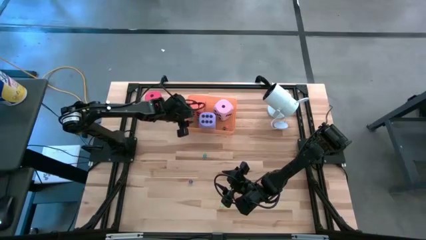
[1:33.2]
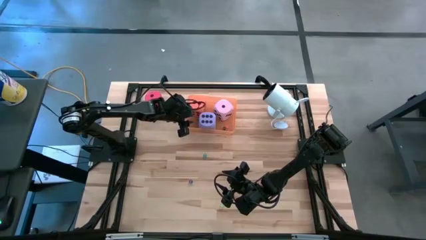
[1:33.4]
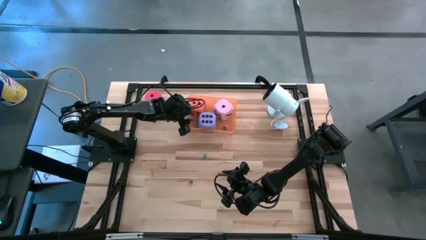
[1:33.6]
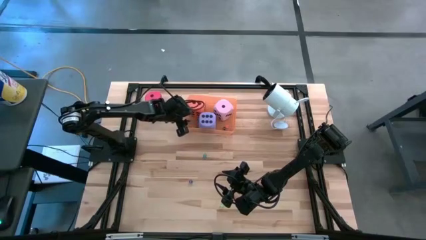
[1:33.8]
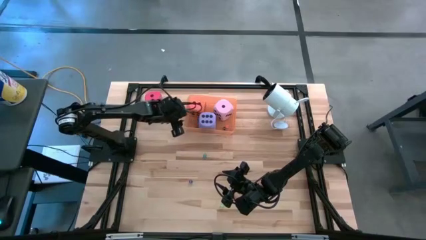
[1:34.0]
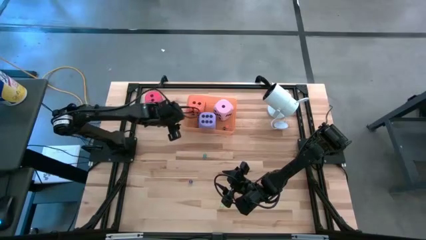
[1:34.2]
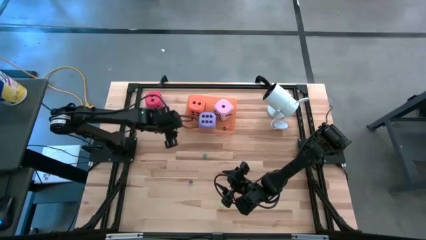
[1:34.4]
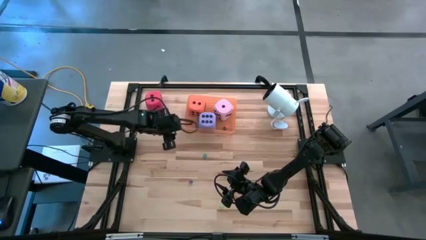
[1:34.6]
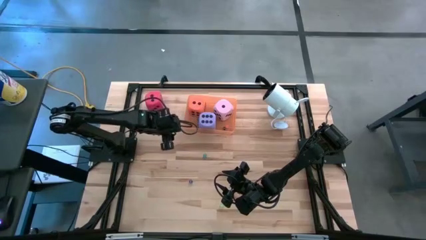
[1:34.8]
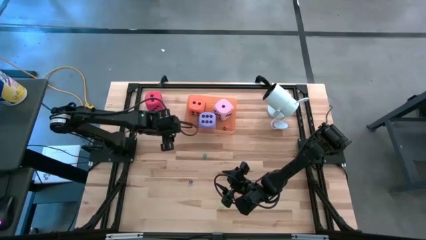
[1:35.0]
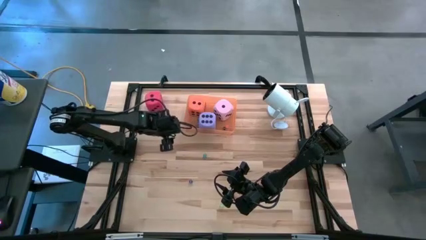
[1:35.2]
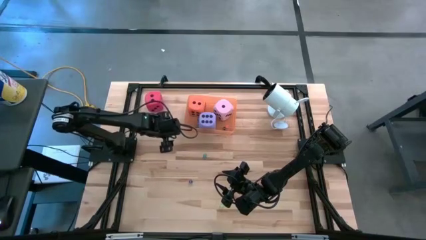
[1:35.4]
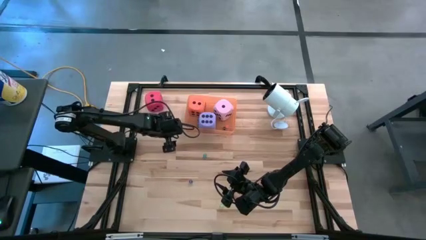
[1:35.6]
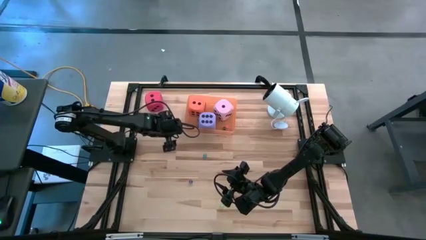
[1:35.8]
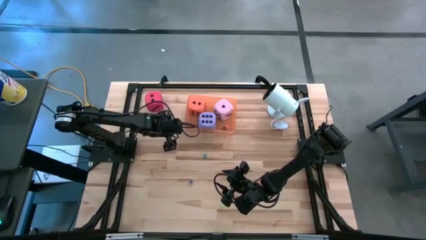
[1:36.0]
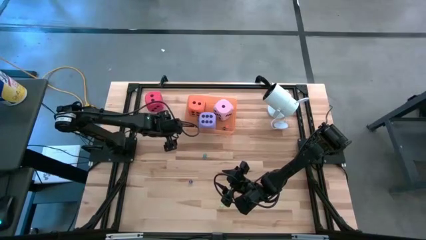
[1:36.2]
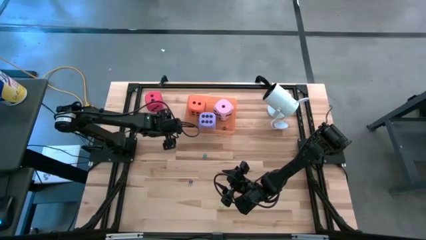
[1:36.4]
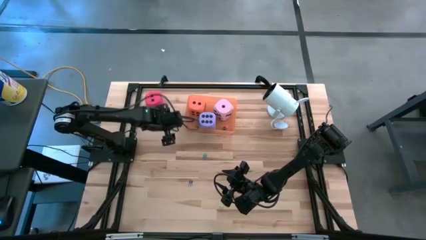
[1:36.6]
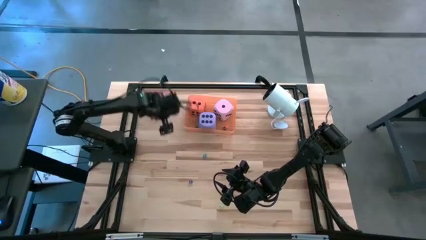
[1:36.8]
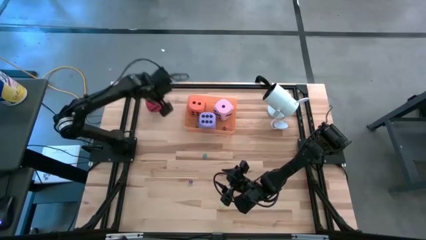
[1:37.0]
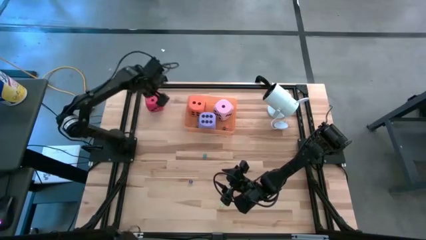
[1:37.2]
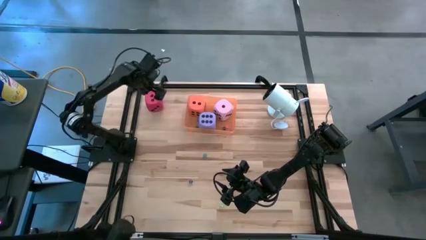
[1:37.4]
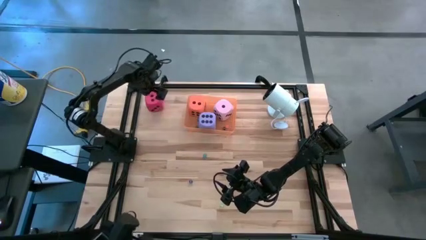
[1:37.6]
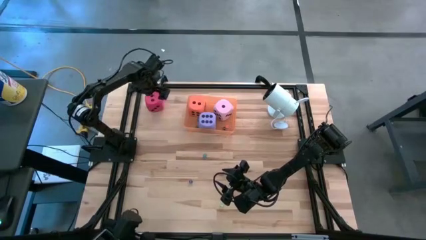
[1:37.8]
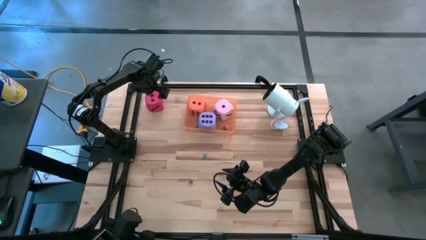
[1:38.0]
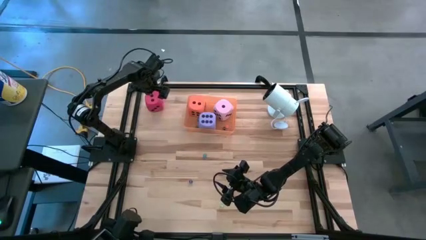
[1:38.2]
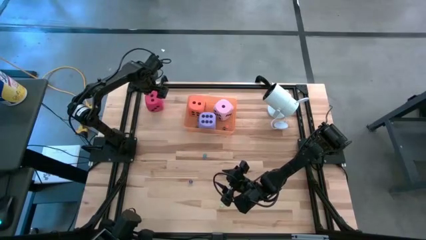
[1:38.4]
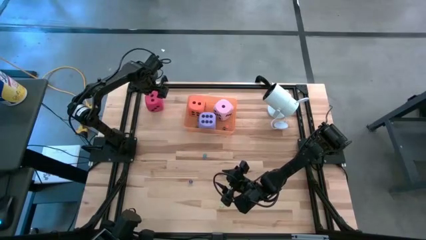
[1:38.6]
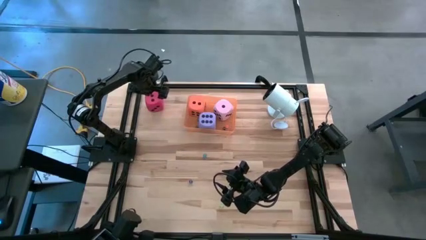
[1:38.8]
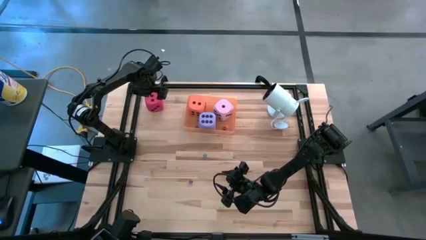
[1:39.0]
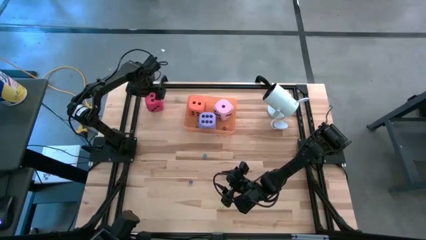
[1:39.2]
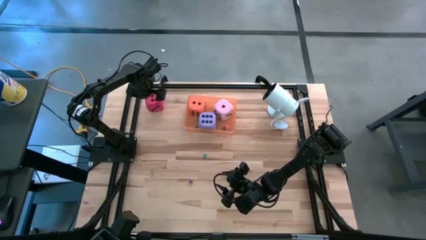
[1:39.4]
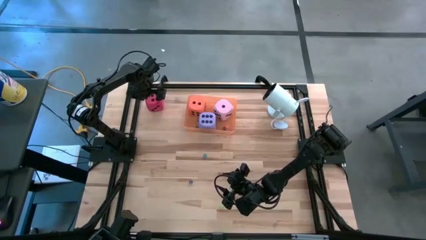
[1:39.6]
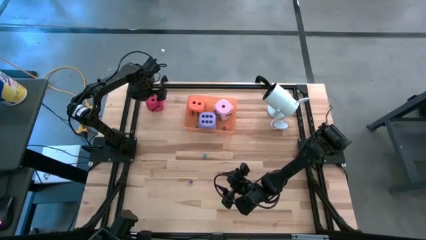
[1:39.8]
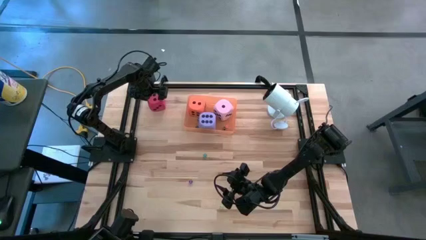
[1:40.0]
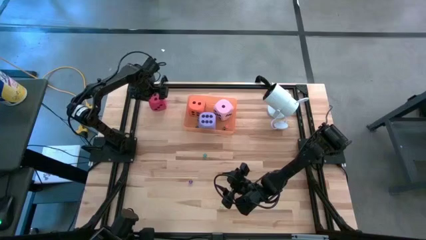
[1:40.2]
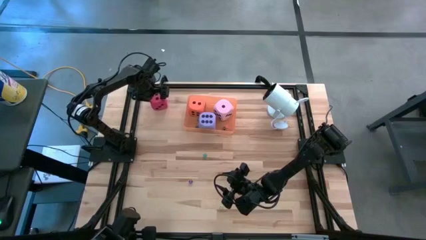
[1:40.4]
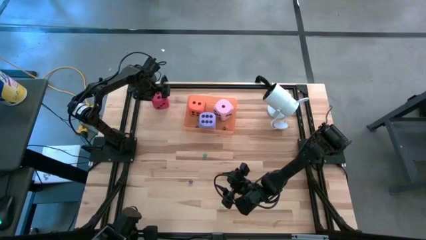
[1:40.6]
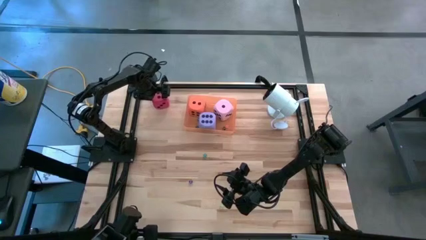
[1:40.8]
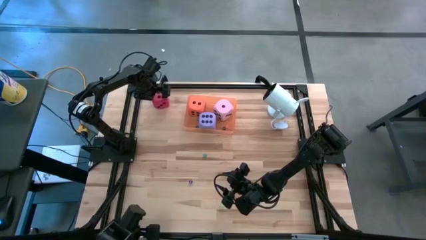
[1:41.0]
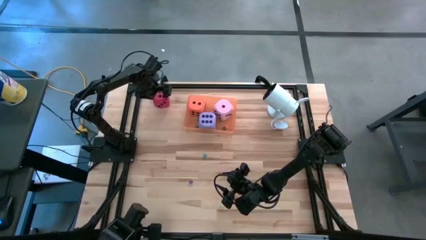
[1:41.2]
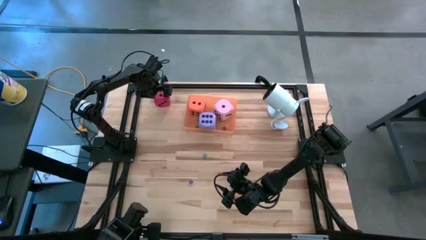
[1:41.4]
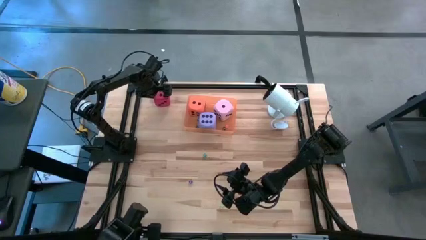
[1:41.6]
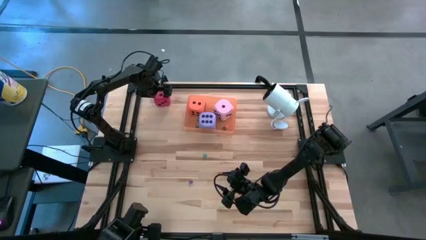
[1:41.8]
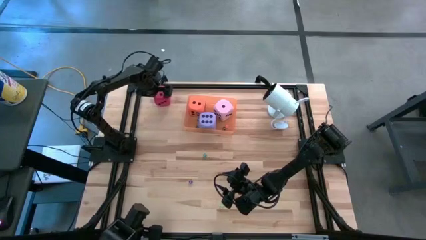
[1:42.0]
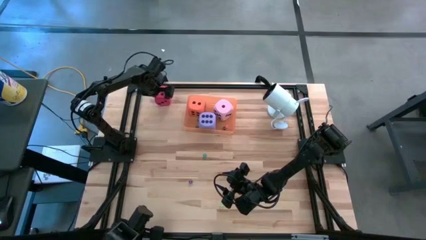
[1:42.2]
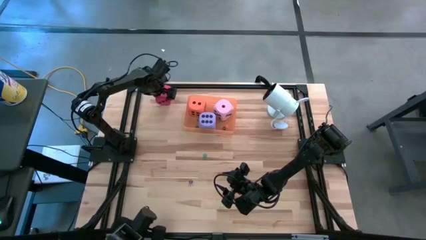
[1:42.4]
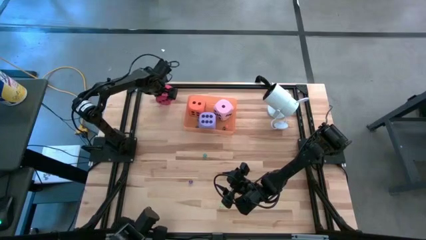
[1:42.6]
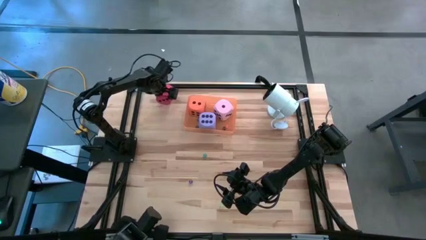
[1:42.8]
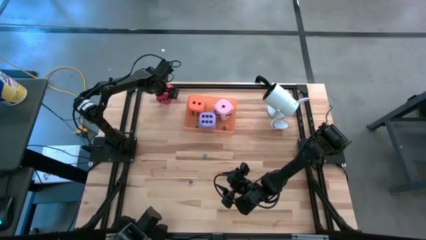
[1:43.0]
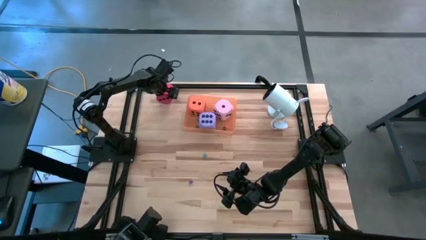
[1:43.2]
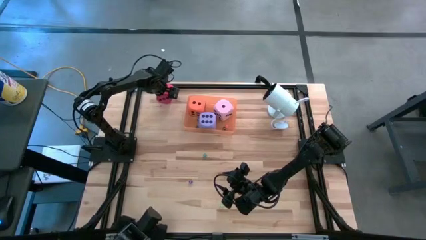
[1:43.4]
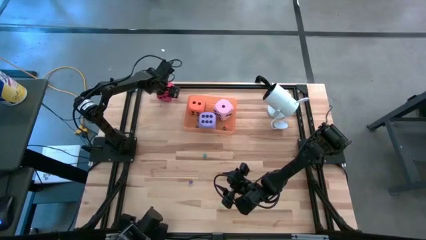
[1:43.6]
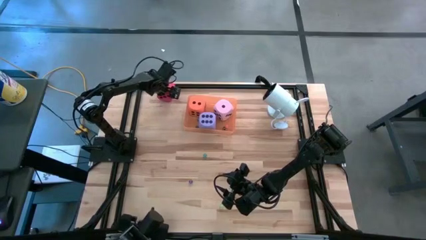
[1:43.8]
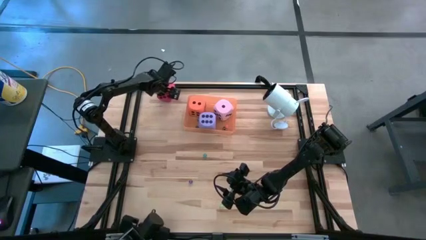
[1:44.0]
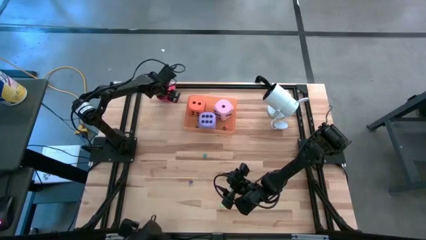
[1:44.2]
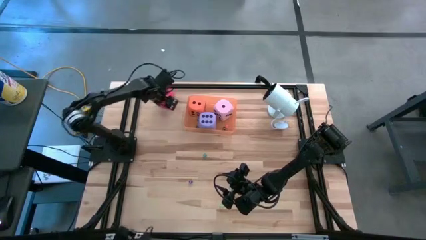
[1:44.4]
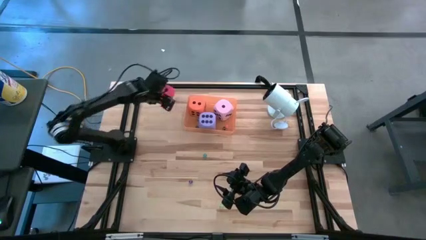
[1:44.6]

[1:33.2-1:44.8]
Task: Pick & Place Dice
Put the large red die into the orange bin

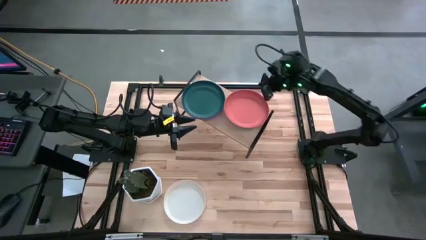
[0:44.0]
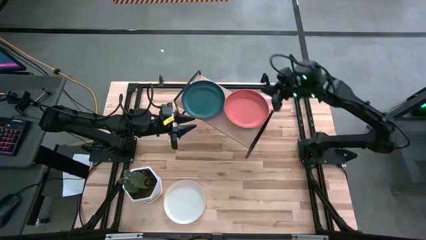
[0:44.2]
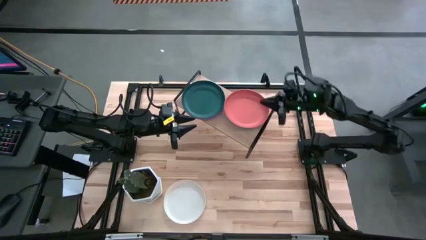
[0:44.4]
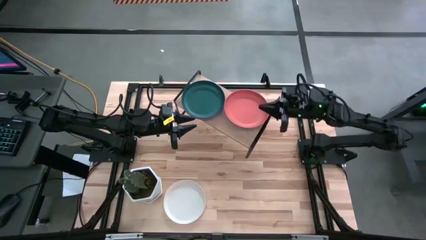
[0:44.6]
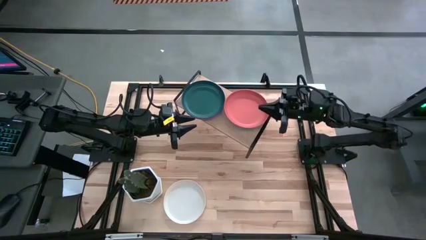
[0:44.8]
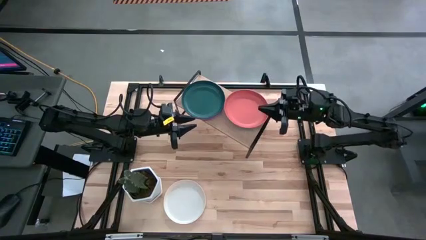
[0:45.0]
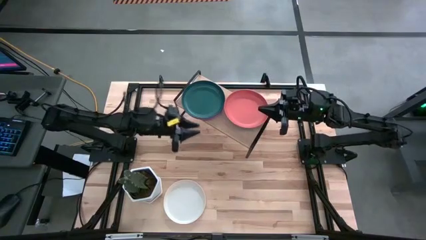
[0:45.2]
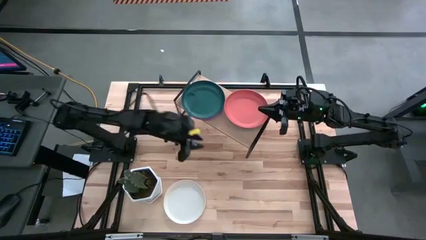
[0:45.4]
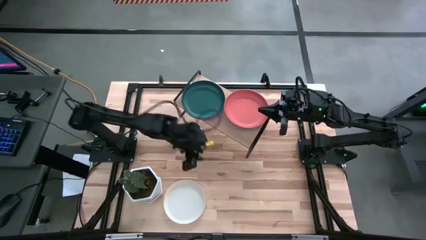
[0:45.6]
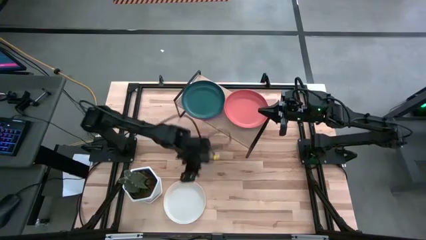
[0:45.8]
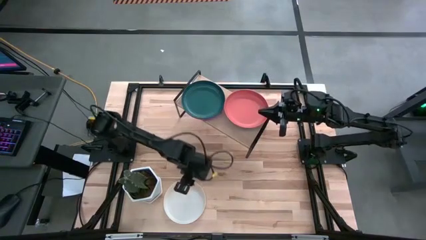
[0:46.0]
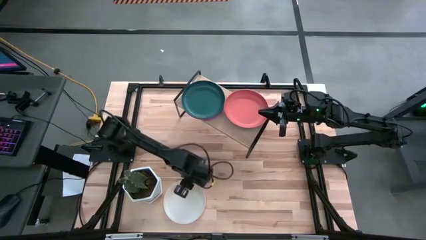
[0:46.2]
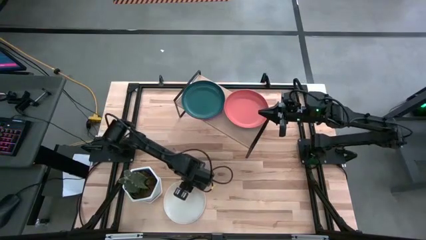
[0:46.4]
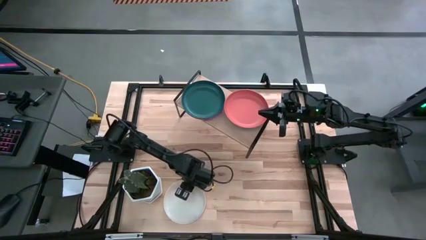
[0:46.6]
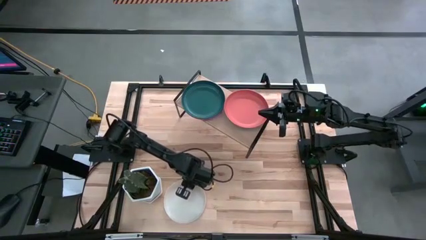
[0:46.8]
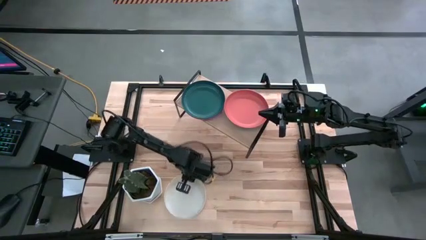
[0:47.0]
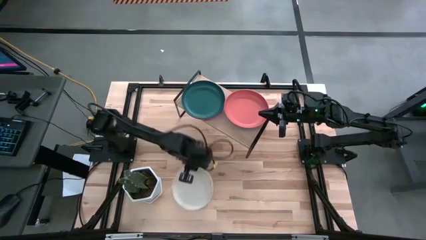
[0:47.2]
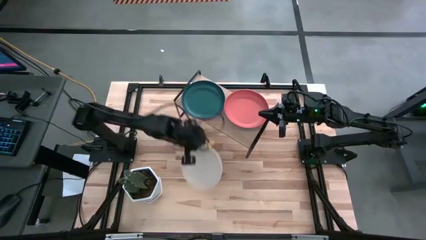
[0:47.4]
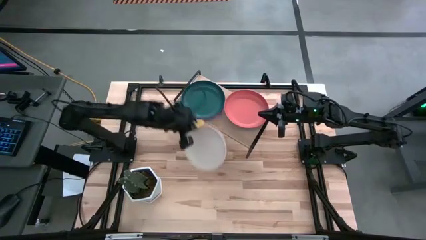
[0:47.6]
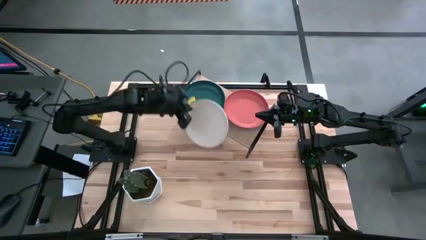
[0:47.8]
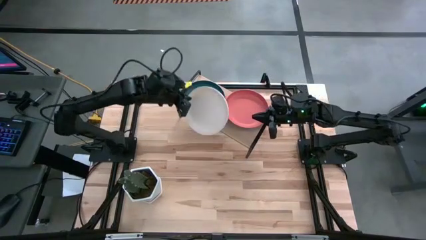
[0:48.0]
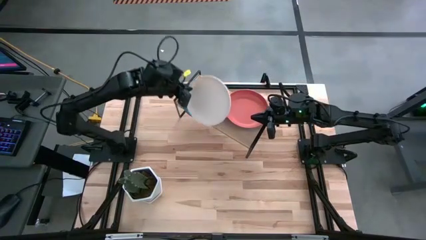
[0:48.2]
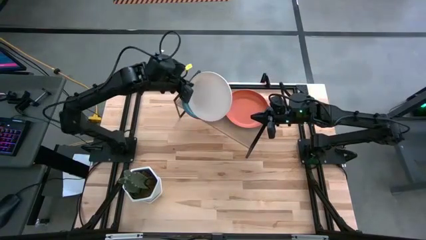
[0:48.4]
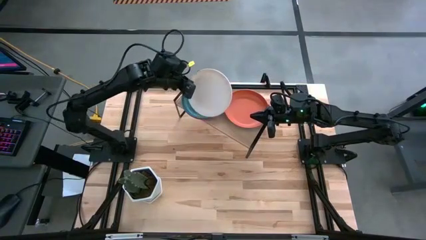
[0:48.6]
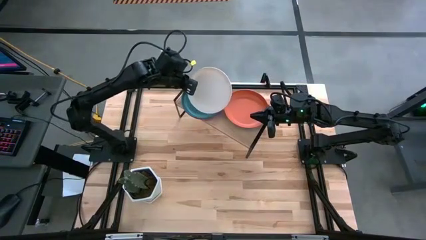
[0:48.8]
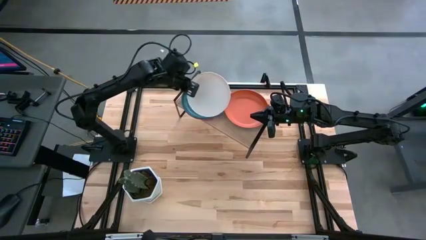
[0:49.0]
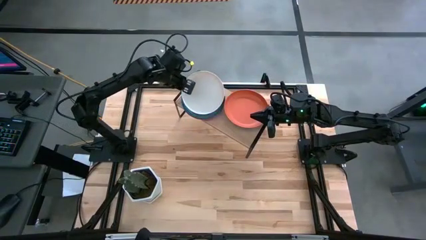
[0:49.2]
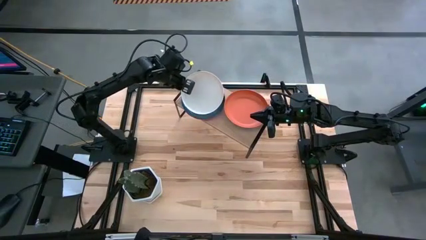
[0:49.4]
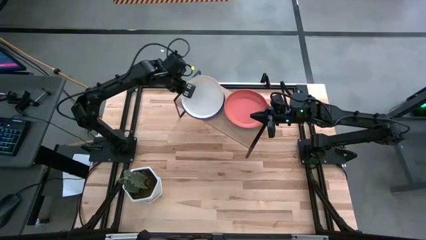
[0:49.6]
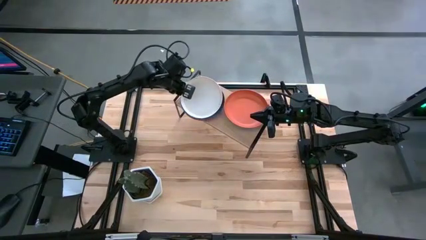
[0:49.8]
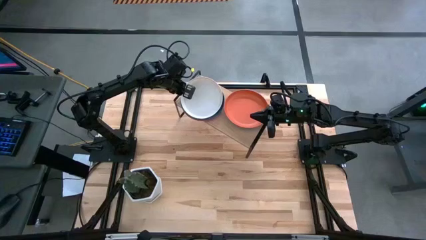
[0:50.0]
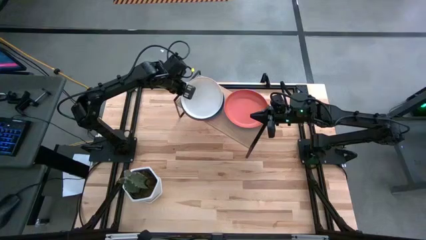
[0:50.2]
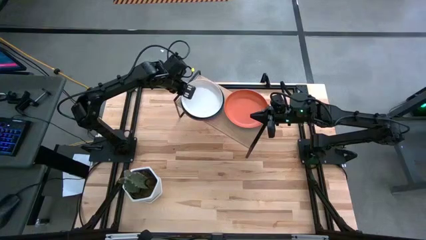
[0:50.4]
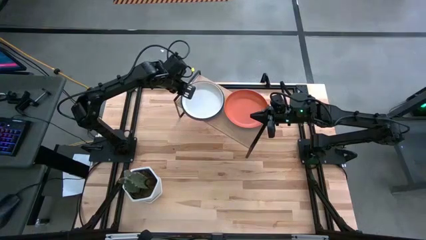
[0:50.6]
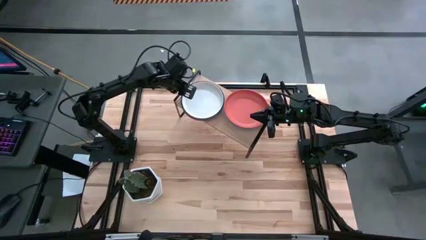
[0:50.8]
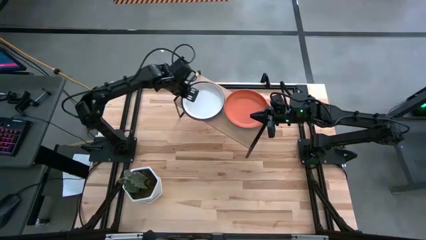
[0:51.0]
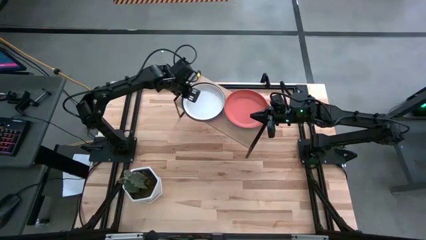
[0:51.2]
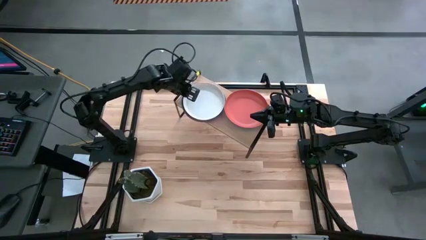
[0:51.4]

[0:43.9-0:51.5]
Task: Place and stack plates onto a shelf
Stack the white plate on top of the green plate
